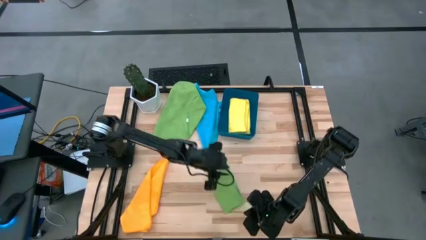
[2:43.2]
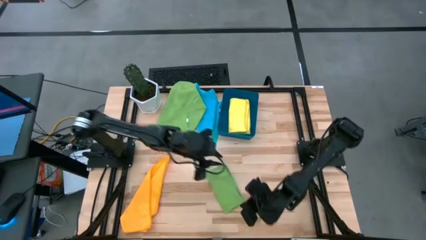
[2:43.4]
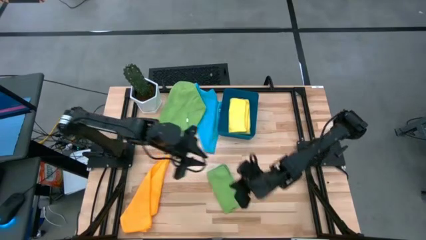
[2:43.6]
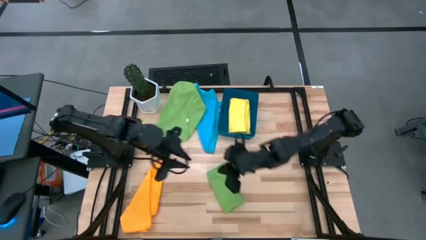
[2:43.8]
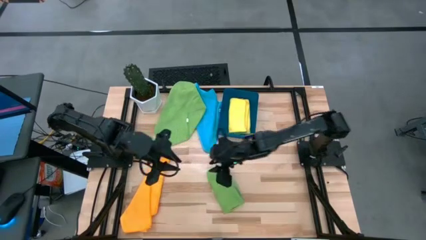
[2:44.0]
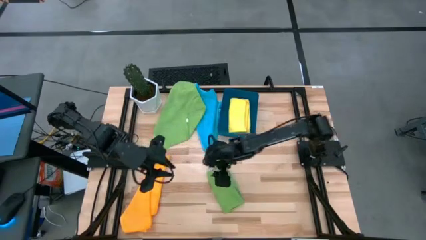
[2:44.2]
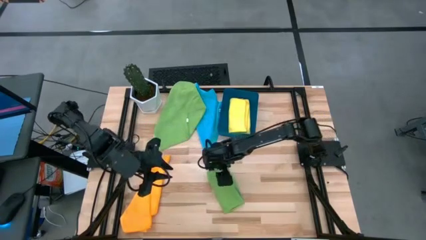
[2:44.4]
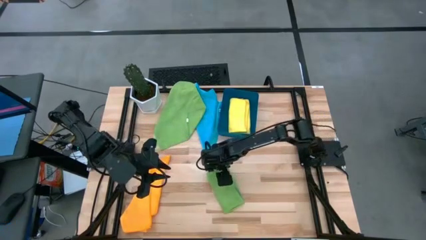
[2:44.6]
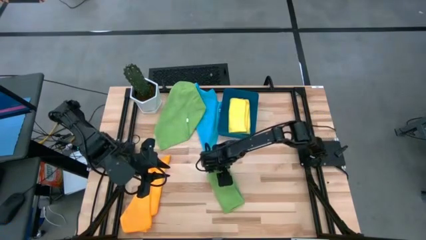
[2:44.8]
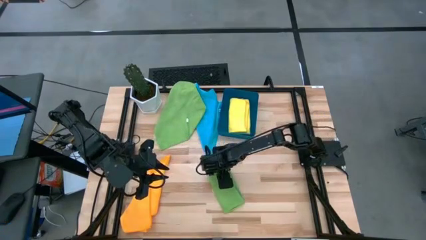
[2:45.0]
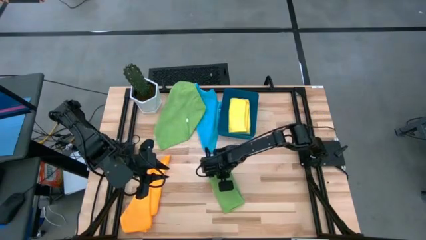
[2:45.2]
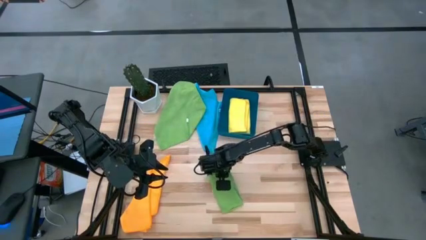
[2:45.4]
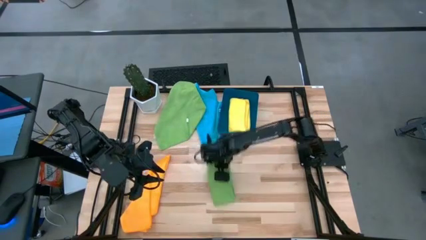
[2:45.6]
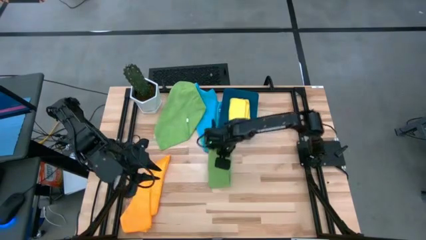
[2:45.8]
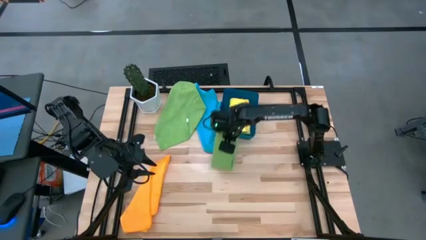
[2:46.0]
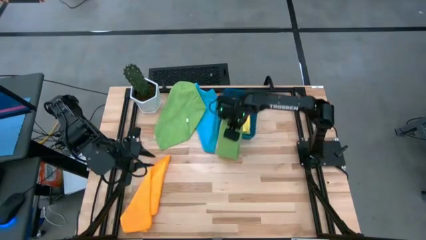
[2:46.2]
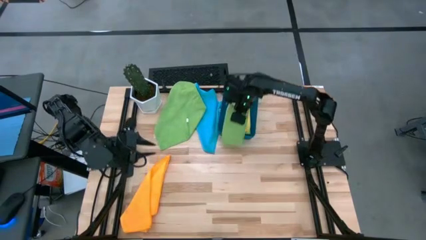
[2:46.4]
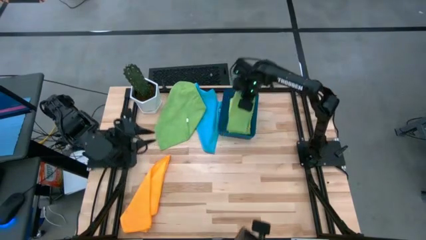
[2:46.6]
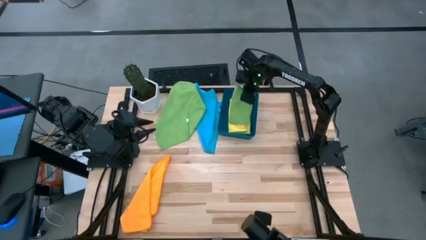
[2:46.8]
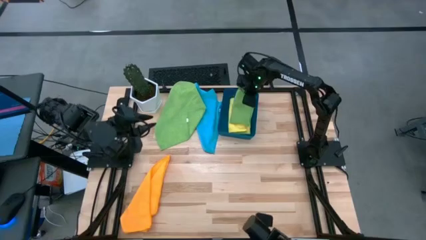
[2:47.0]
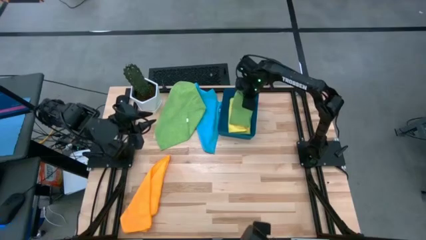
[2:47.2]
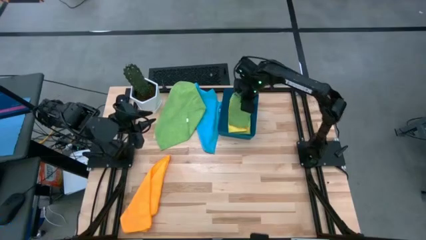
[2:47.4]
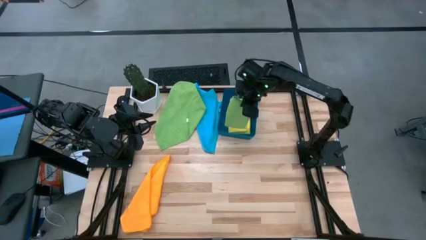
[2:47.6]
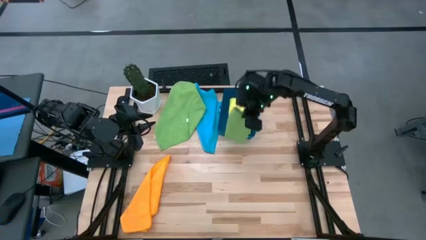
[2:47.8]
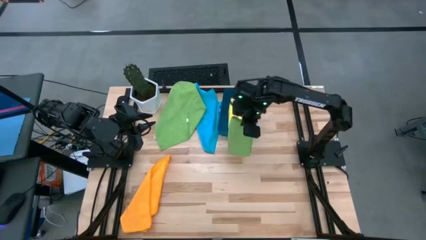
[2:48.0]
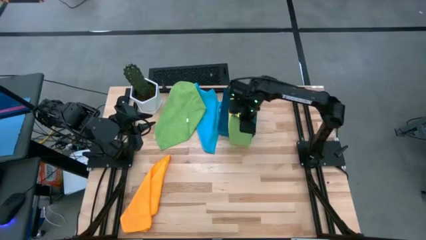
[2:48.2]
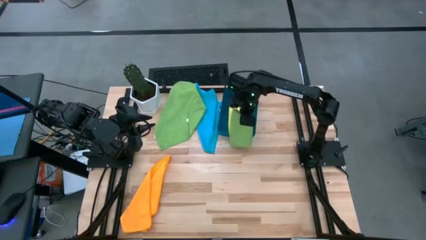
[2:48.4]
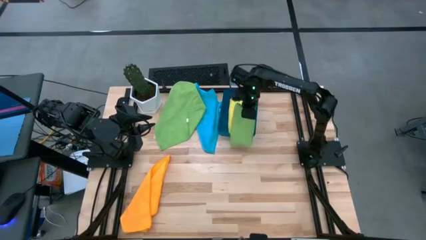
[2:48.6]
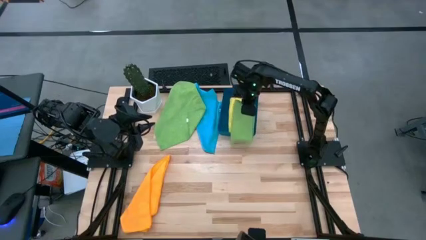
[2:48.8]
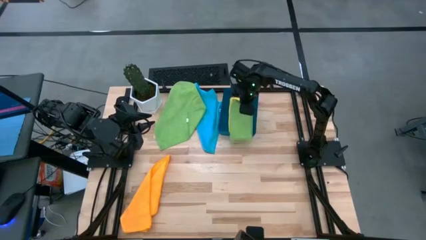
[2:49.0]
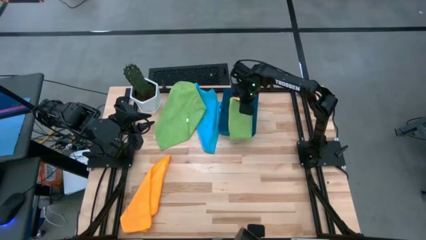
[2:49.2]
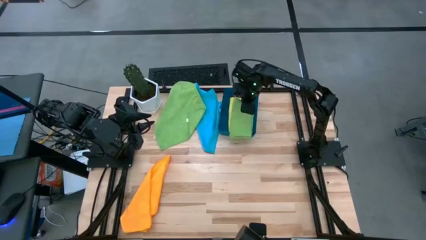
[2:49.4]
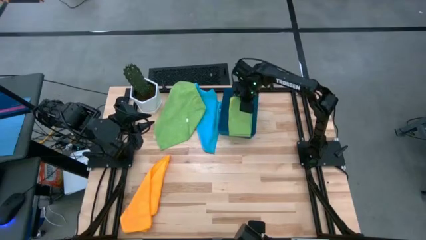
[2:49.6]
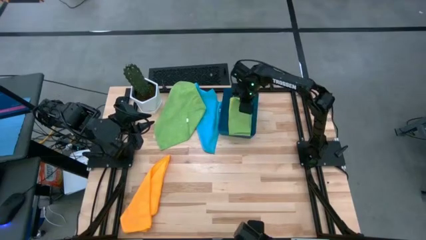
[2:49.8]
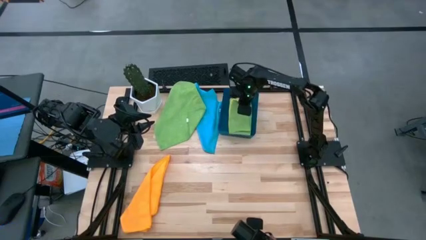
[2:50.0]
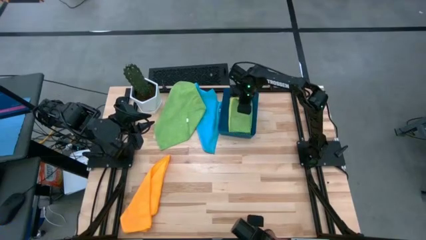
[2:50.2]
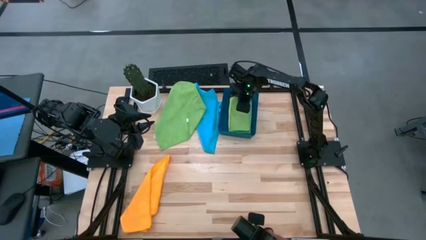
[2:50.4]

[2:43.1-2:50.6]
Task: Fold microfiber towels
Put the right green towel into the blue bin

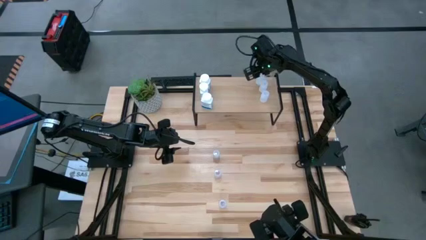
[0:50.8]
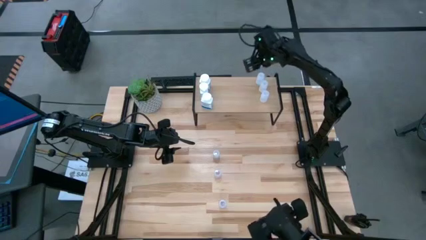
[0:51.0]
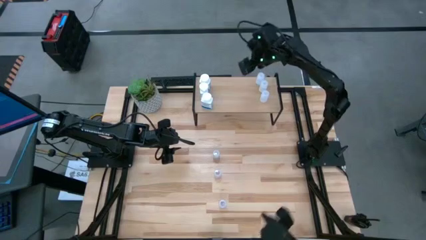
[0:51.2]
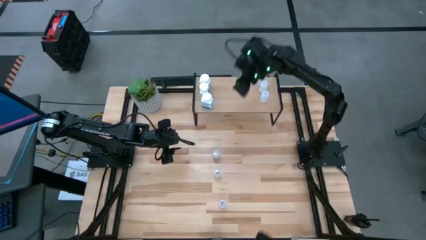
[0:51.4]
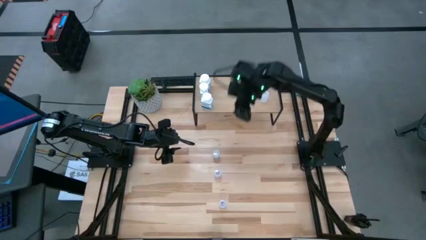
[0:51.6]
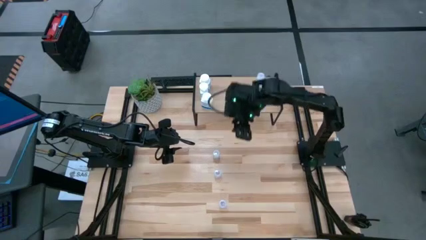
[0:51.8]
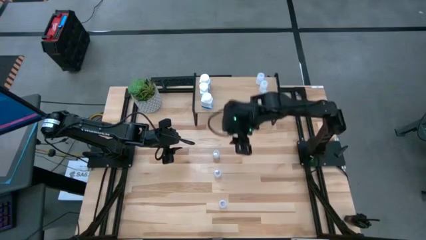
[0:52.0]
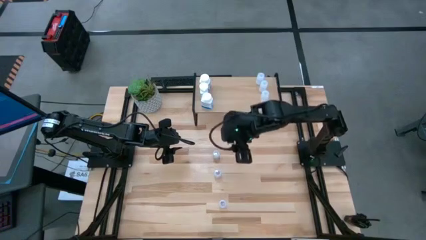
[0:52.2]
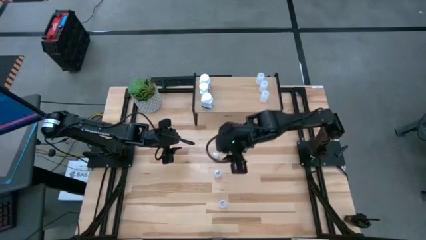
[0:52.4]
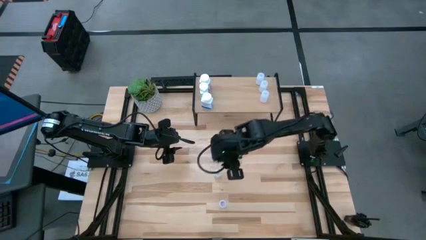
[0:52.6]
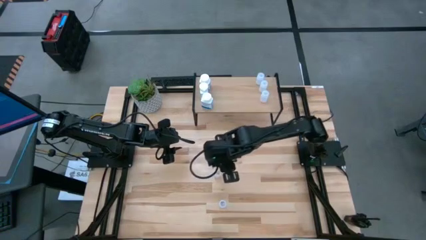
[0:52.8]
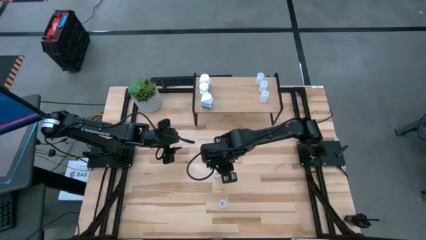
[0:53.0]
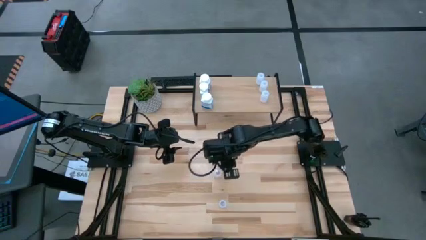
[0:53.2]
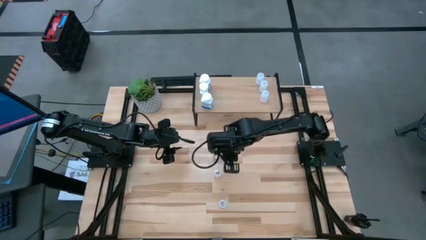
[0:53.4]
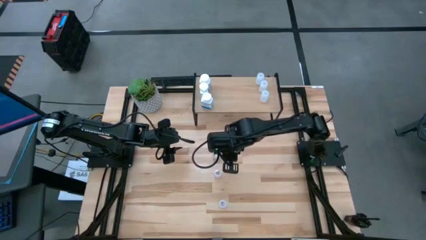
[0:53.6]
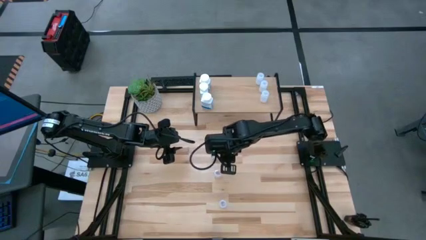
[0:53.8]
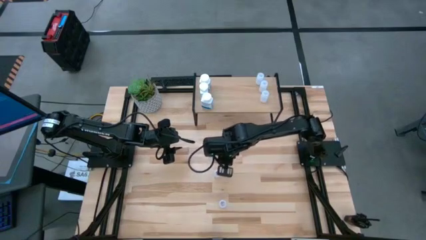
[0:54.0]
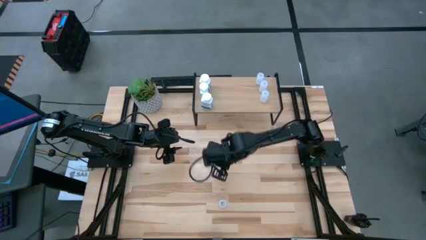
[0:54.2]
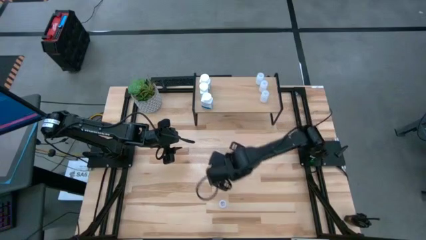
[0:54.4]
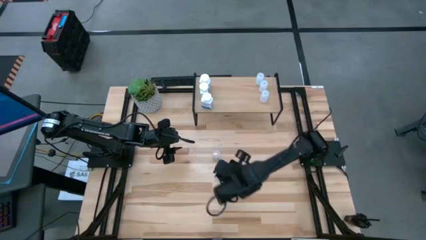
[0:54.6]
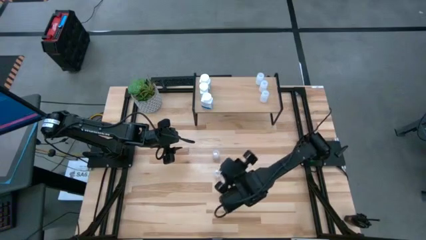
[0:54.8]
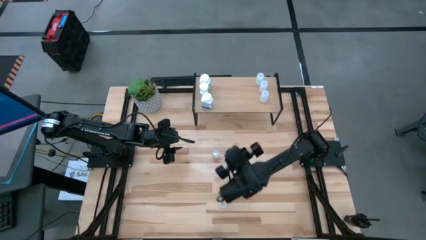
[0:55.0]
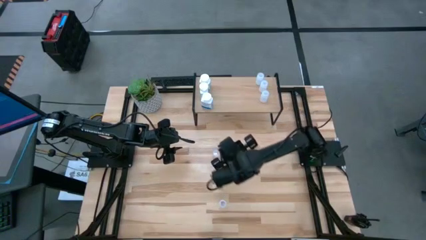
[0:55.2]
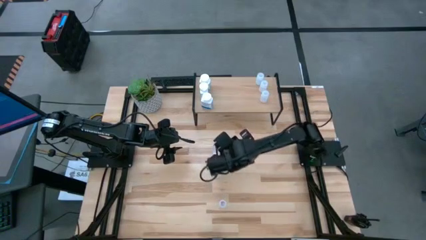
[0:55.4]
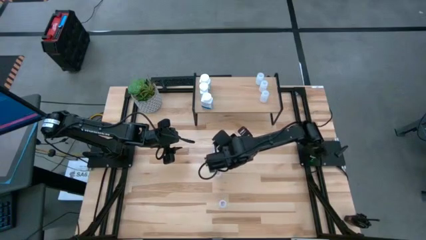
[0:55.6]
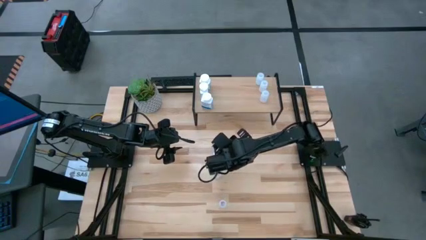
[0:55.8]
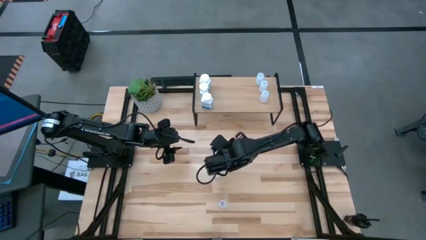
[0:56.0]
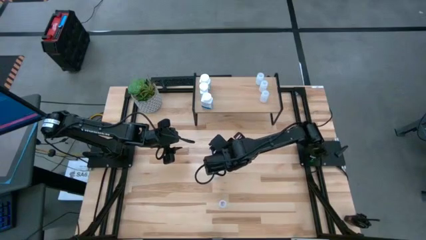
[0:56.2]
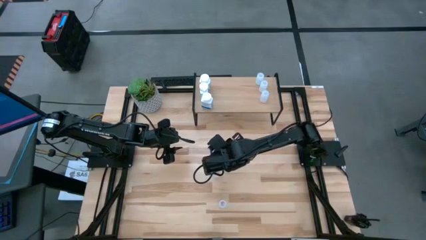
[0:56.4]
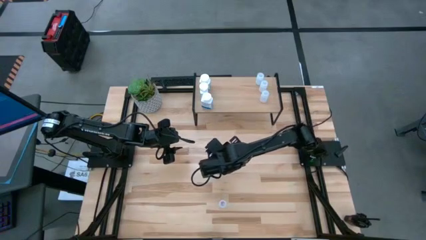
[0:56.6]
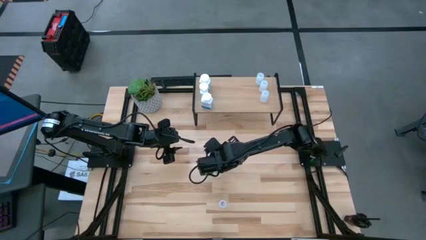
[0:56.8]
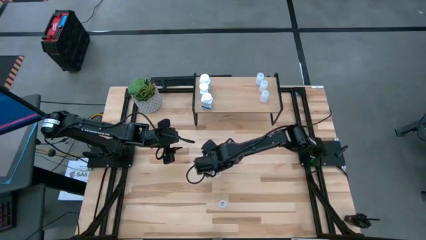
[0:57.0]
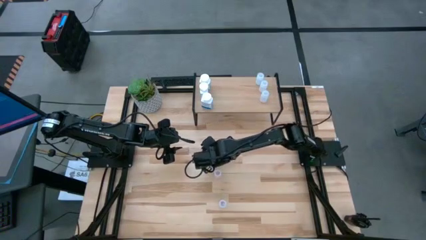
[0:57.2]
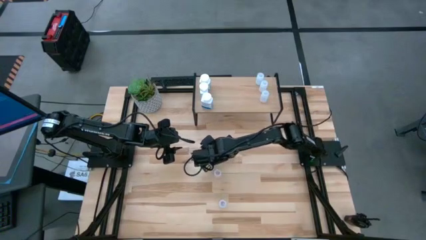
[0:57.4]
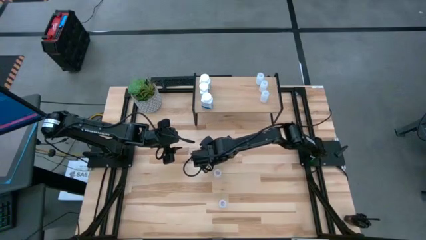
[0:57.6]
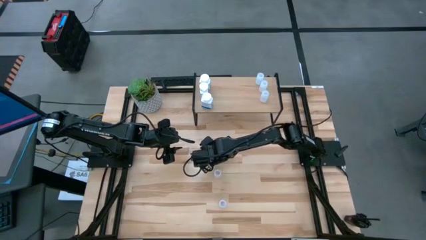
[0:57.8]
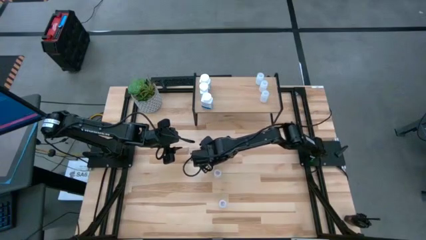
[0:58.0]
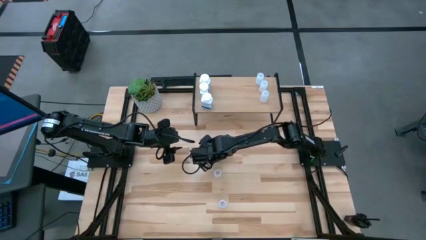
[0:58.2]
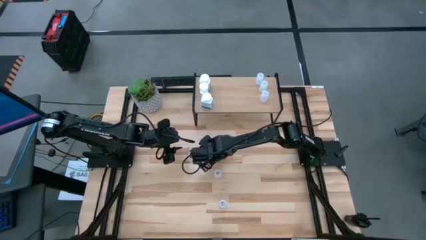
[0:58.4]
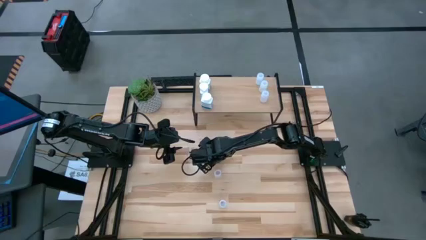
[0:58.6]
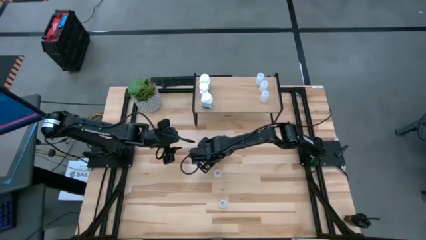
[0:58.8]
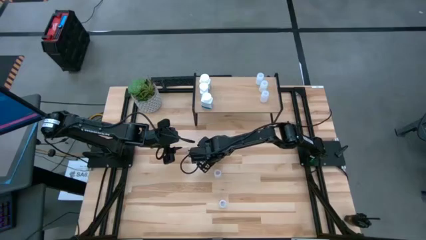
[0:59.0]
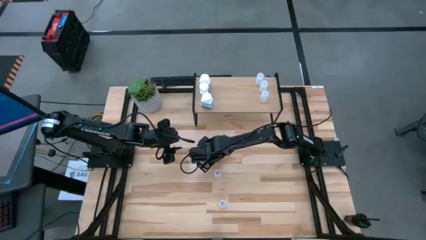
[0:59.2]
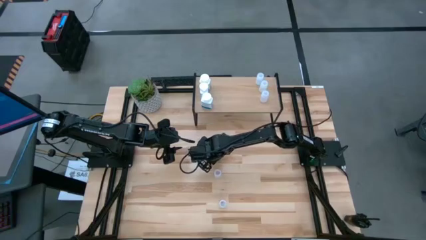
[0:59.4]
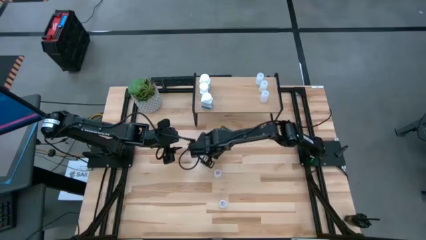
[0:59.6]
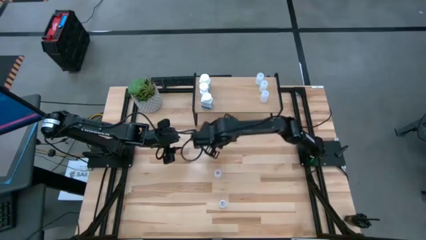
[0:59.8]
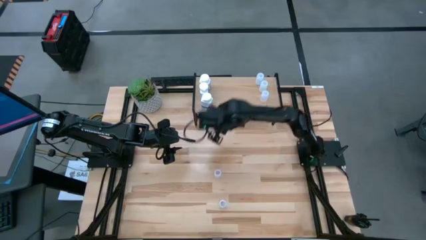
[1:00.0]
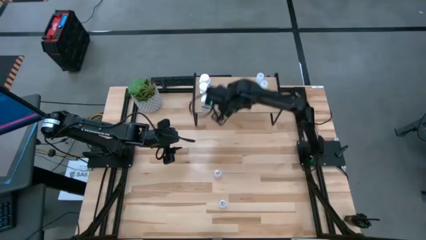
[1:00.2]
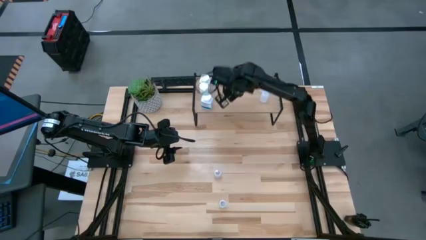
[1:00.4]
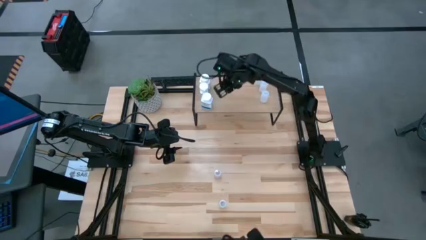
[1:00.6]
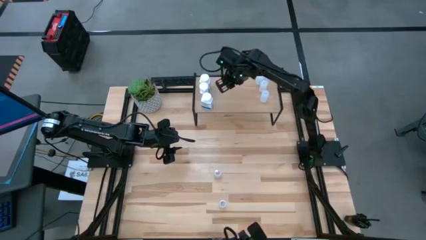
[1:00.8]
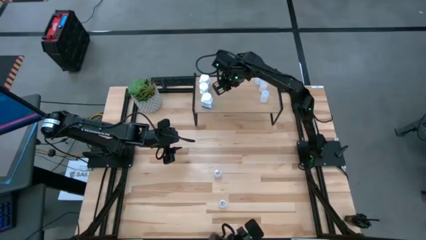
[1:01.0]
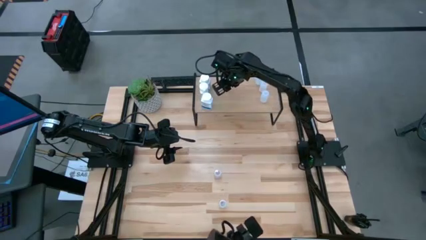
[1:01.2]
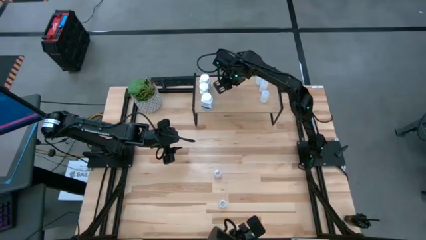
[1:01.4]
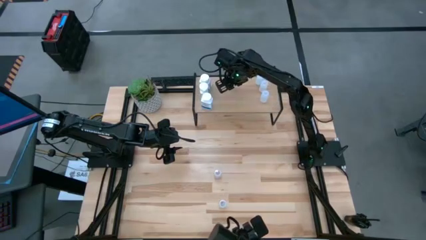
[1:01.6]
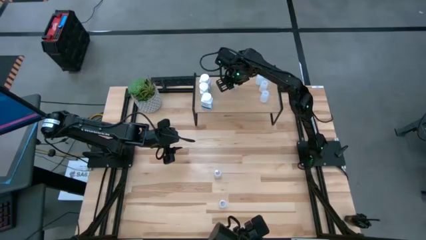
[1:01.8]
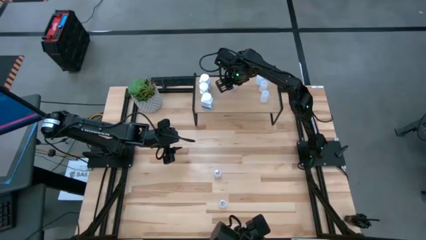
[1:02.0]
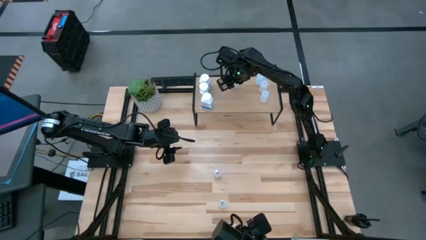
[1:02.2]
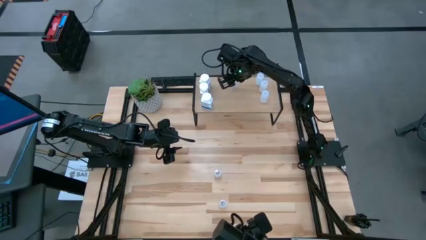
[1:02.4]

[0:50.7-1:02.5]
Task: Pick and place medicine bottles onto shelf by color
Put the top transparent pill bottle on the shelf
